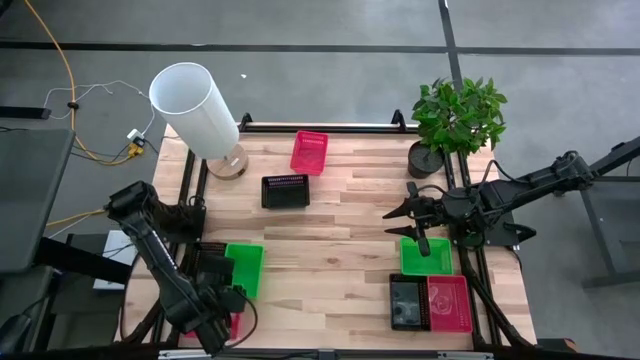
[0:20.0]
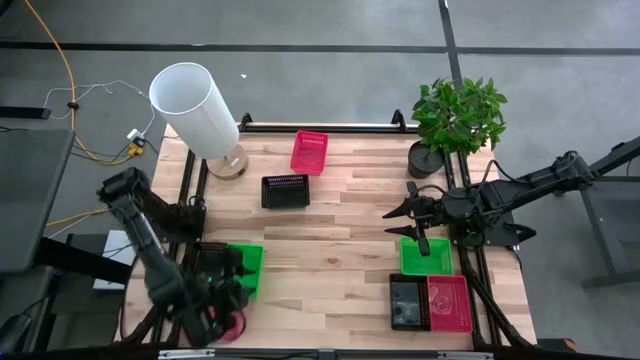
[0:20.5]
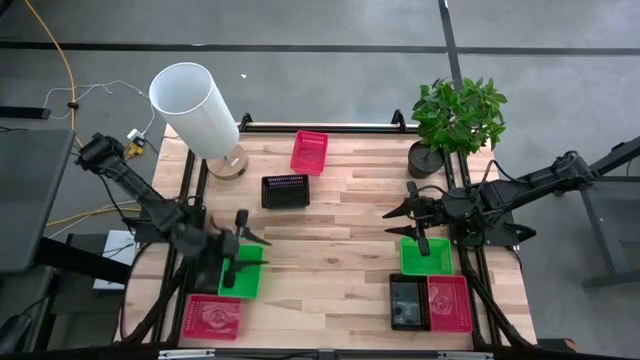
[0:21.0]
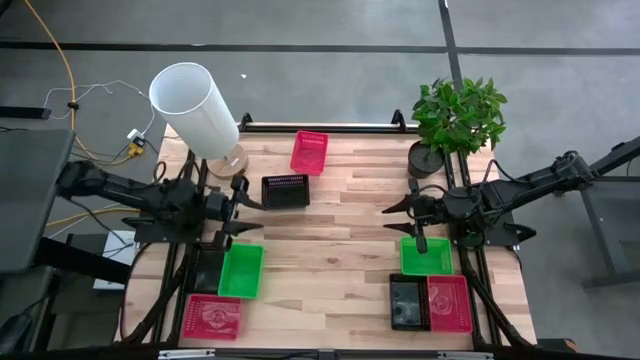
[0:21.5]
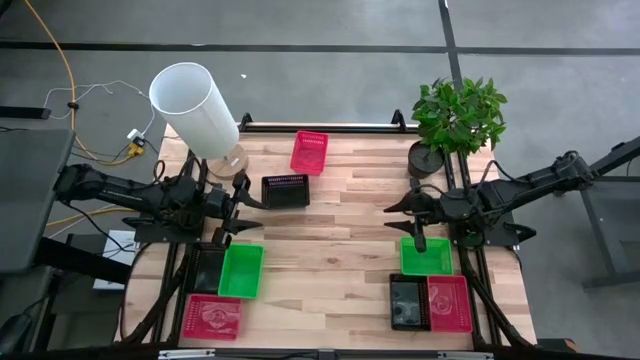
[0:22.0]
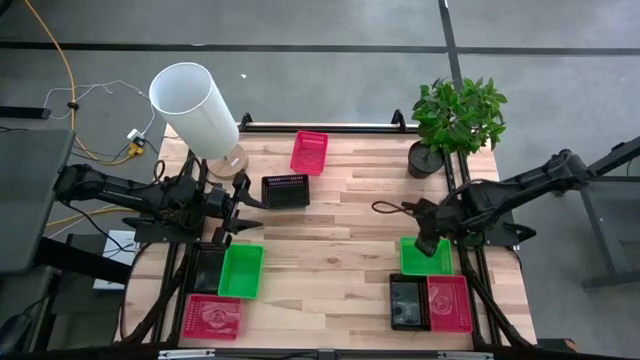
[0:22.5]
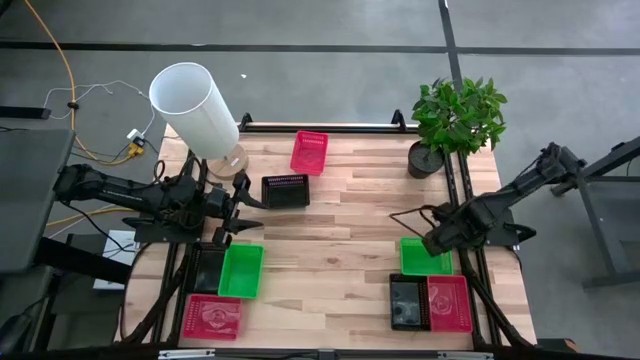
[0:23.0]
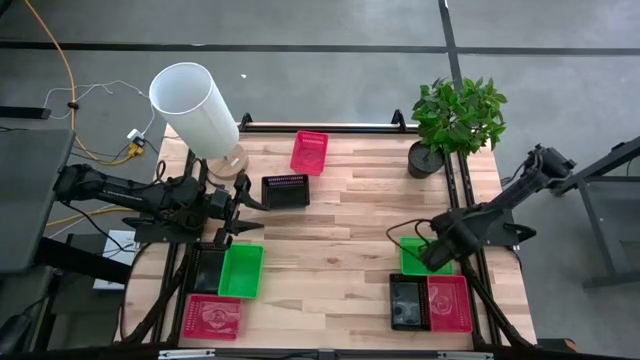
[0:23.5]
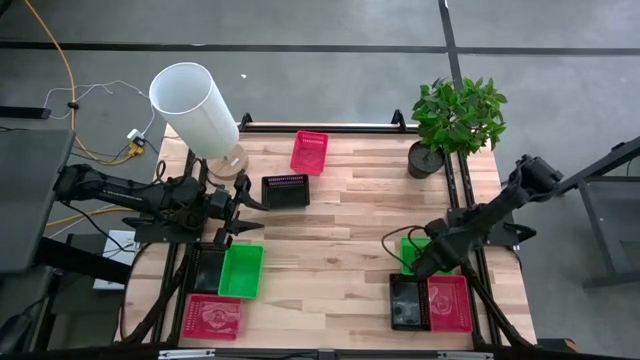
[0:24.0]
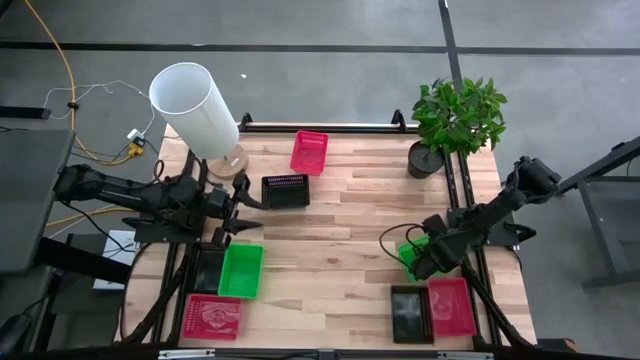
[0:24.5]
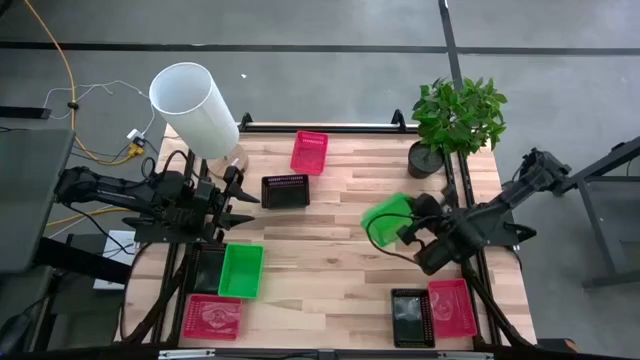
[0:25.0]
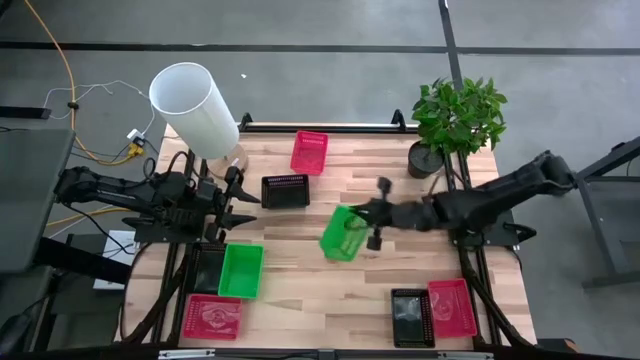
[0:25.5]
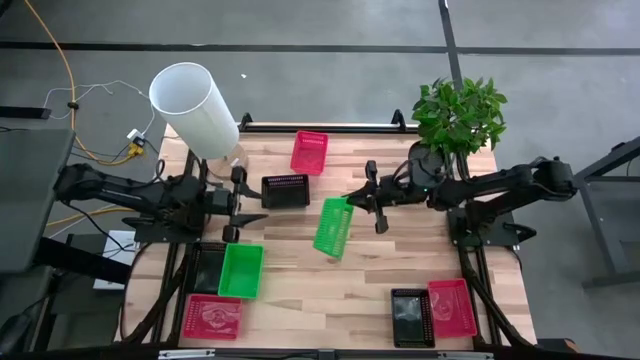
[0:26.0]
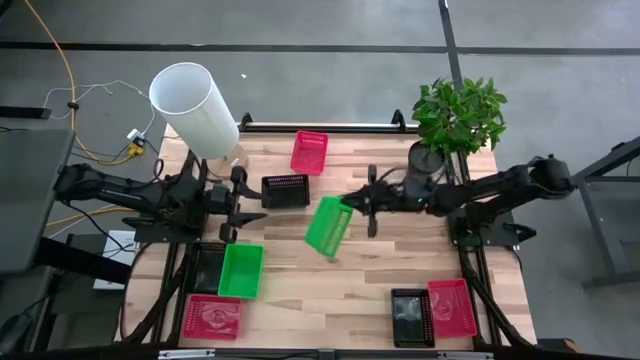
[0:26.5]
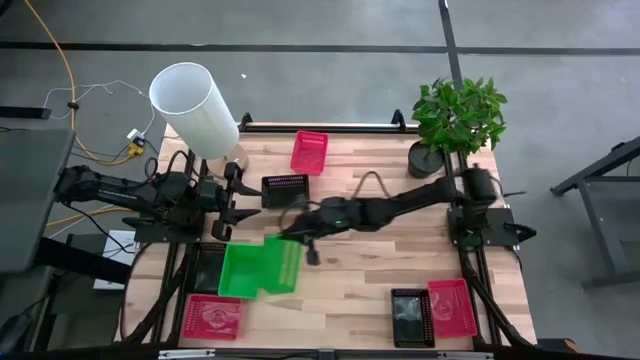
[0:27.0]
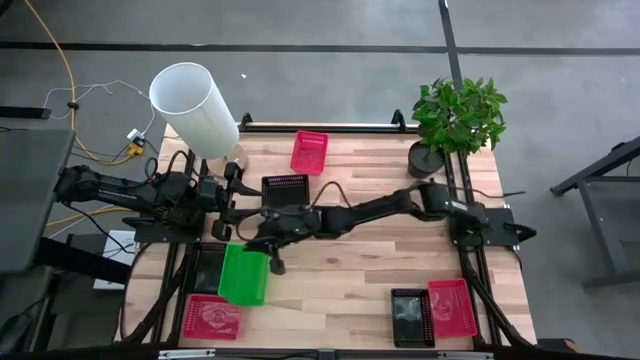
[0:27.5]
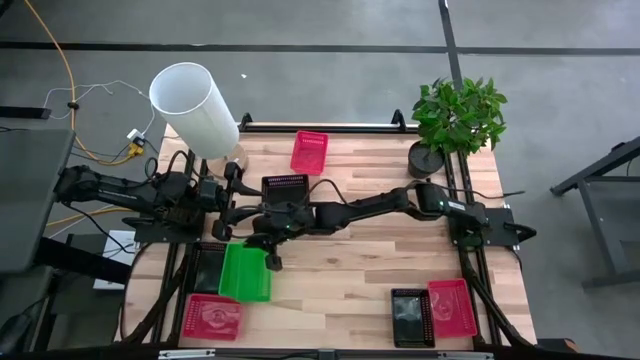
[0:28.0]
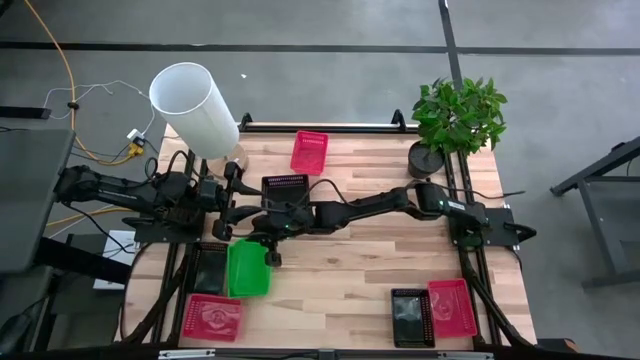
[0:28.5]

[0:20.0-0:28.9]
Stack the right green bin on top of the left green bin

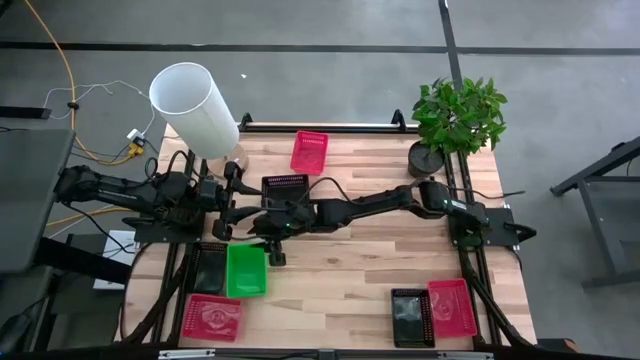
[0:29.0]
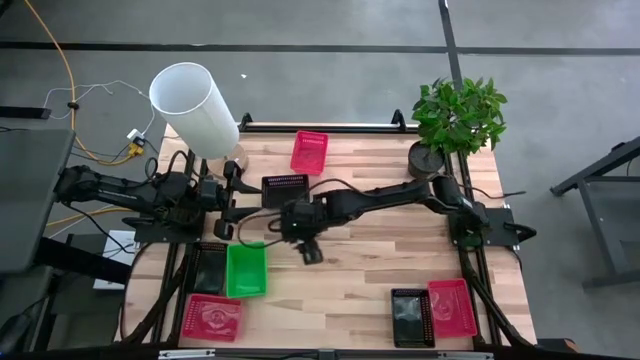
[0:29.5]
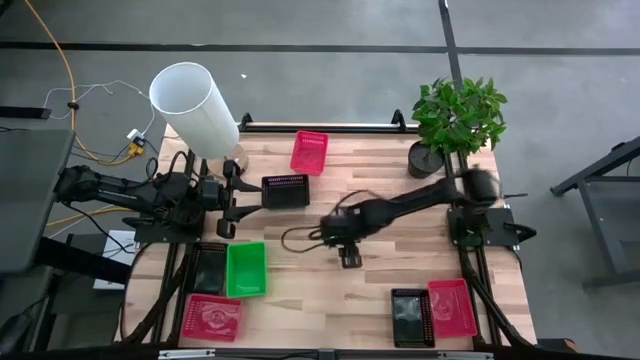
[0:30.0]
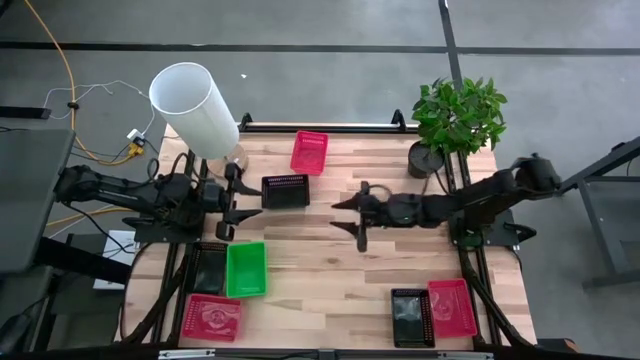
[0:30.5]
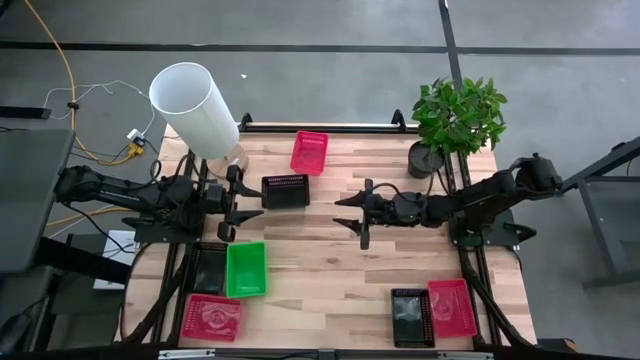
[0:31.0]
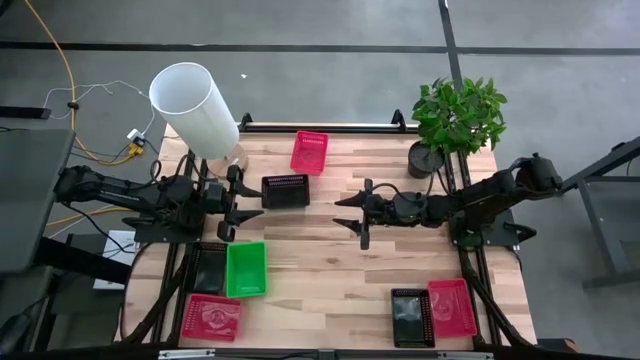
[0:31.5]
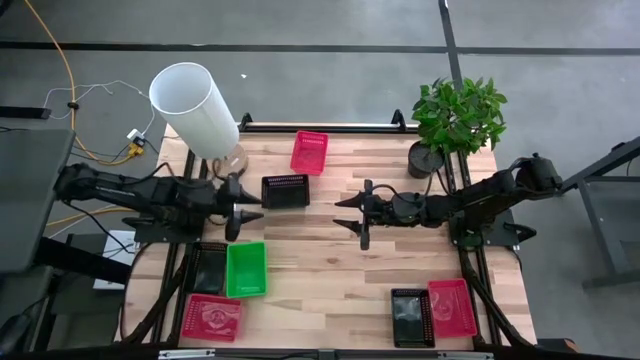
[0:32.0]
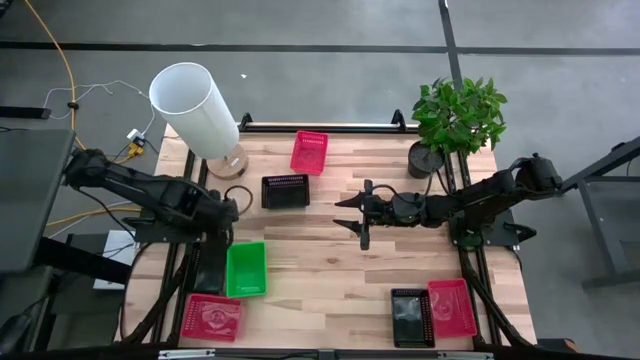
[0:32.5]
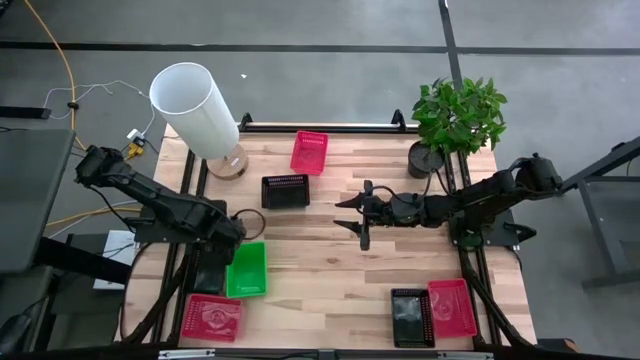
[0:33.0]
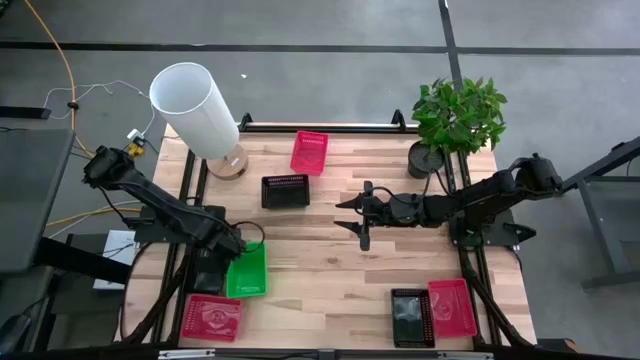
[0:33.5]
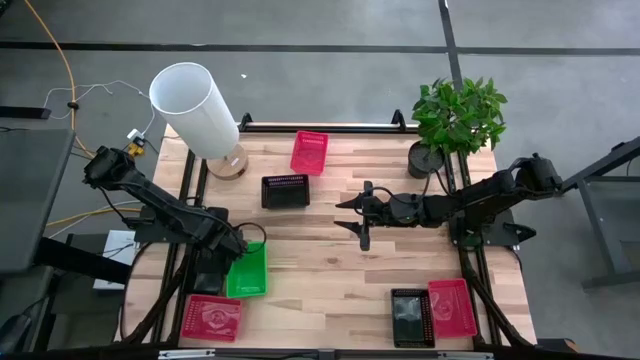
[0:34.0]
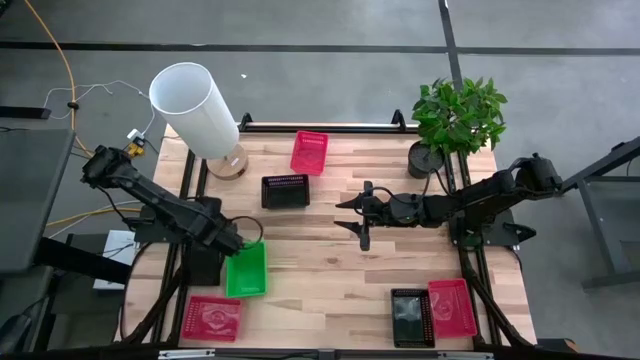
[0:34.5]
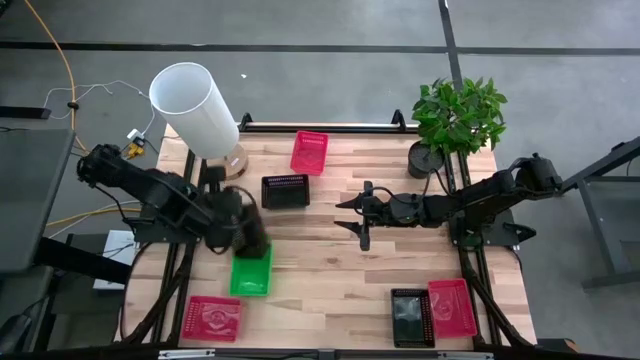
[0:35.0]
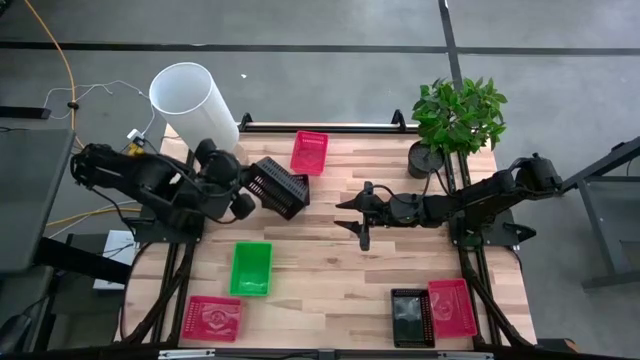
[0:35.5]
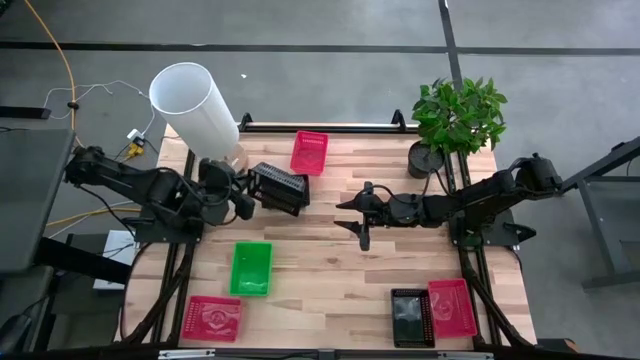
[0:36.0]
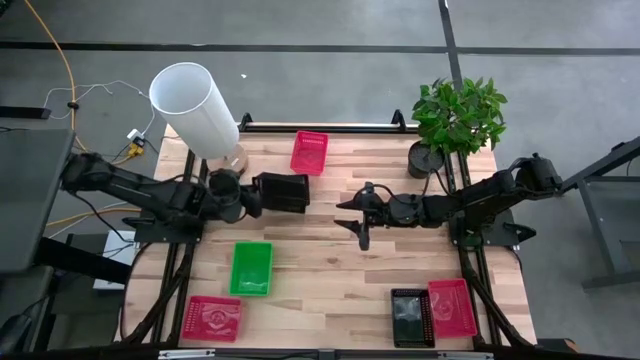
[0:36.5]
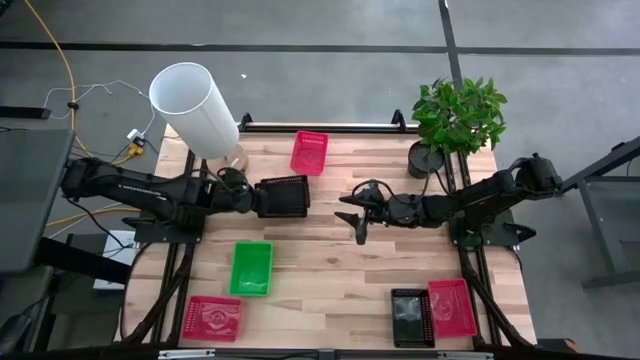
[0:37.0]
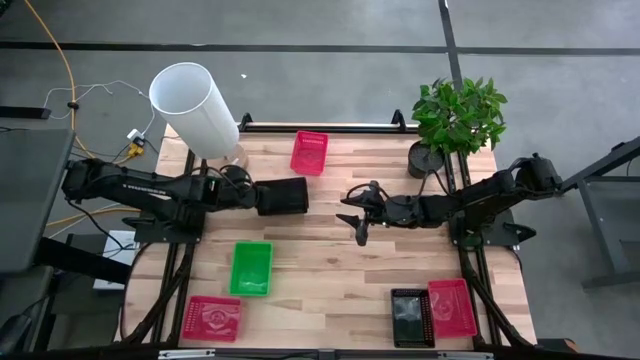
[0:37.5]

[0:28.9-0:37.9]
Stack the left black bin on top of the top black bin

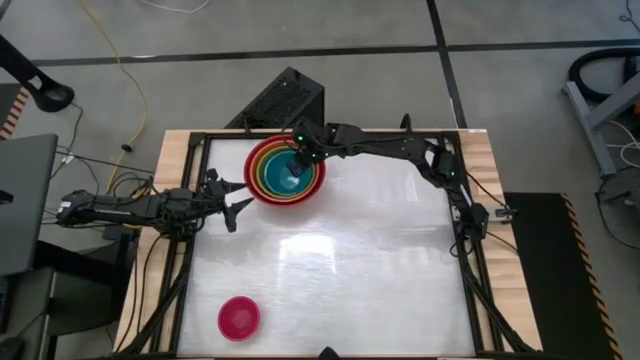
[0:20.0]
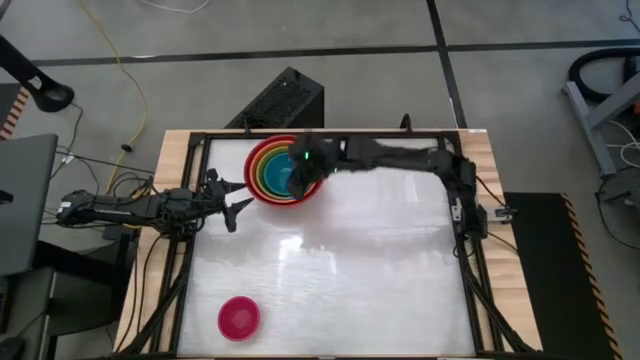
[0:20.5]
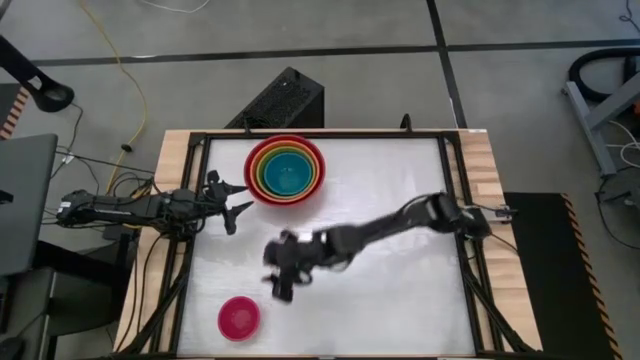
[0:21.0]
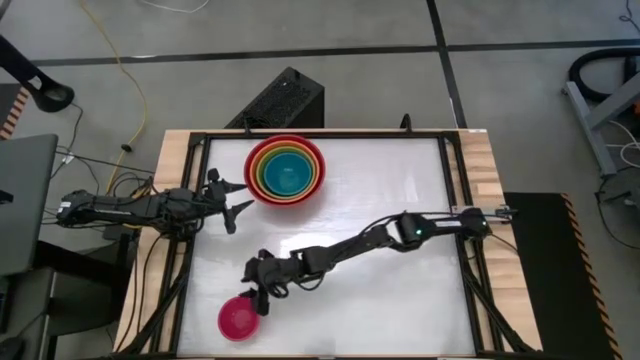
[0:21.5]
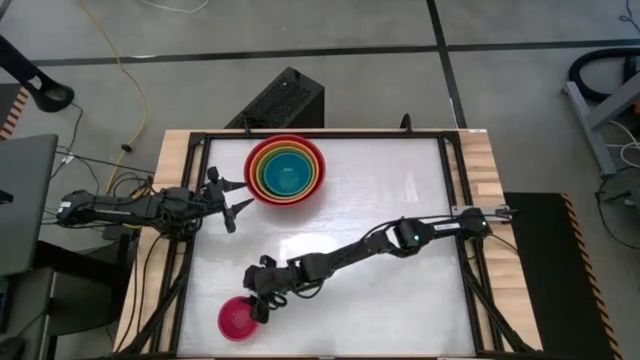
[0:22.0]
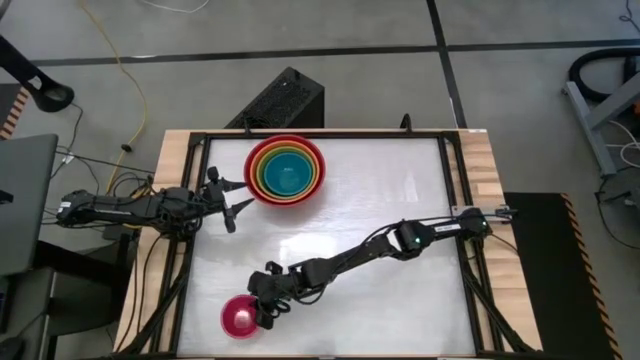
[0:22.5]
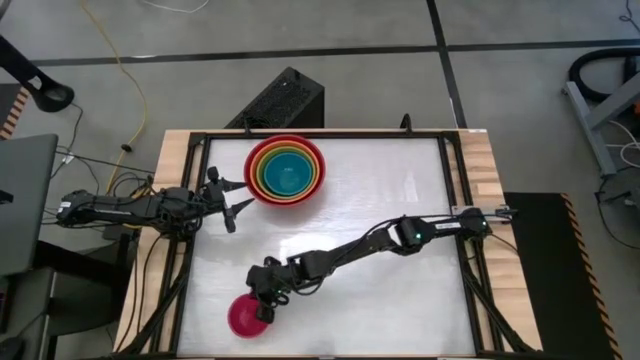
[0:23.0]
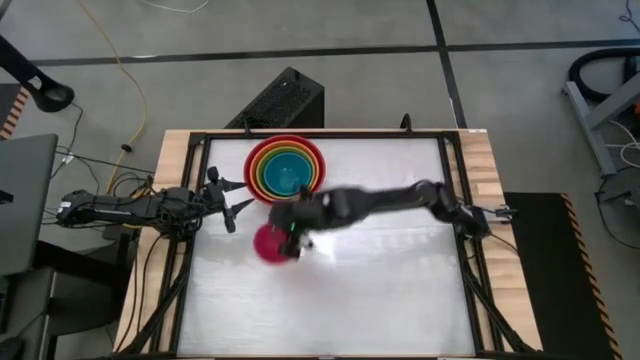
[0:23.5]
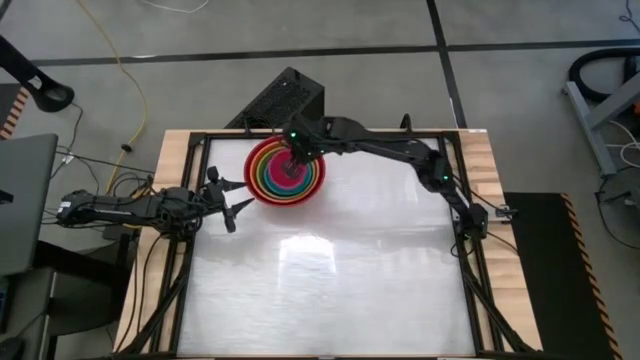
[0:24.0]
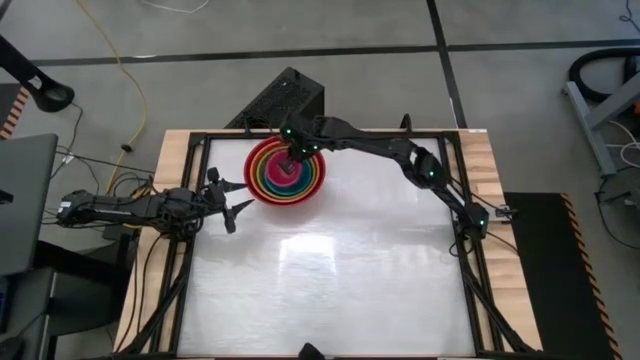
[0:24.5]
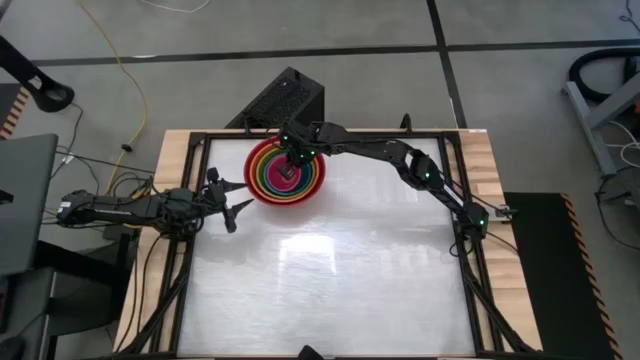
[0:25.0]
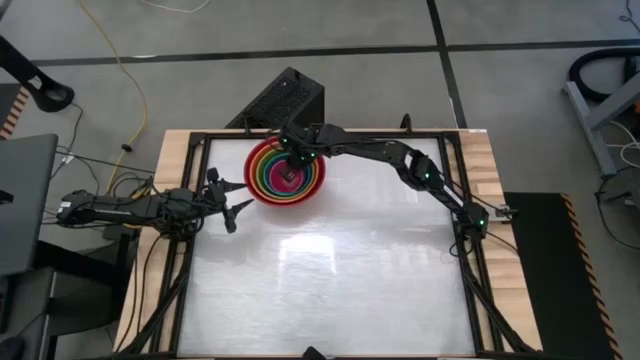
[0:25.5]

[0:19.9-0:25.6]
Stack the pink bowl on top of the blue bowl
